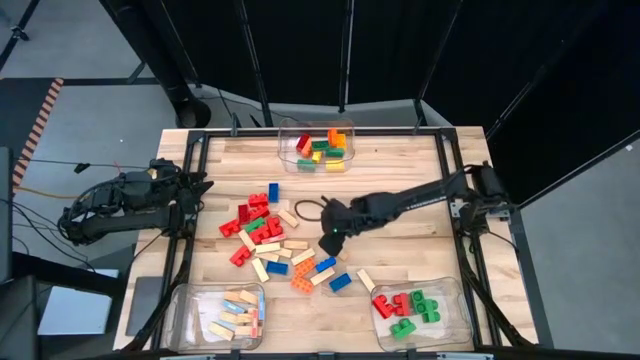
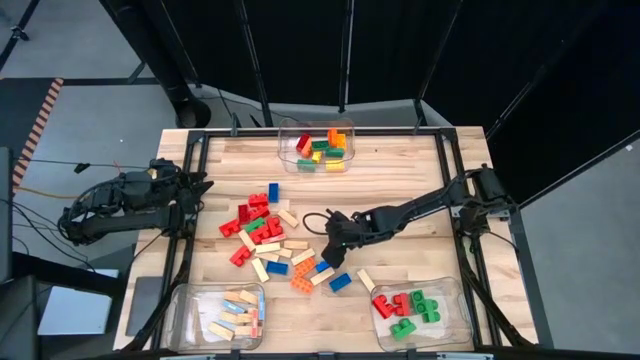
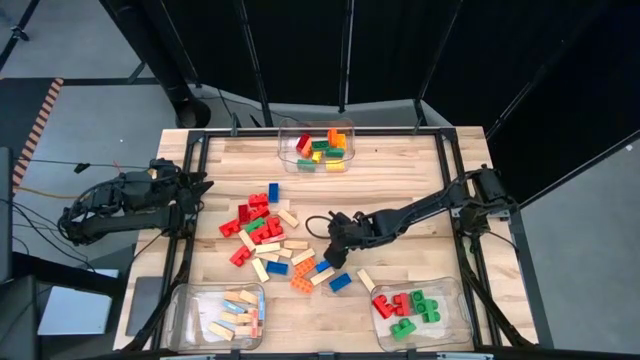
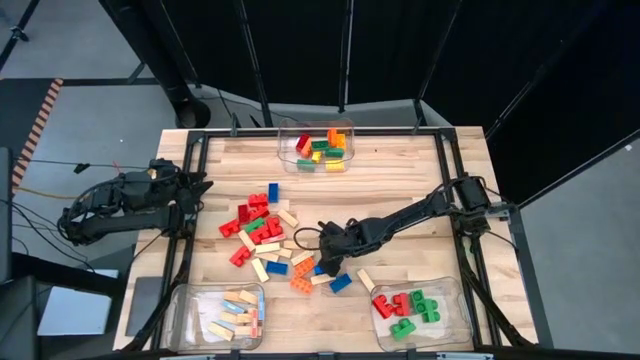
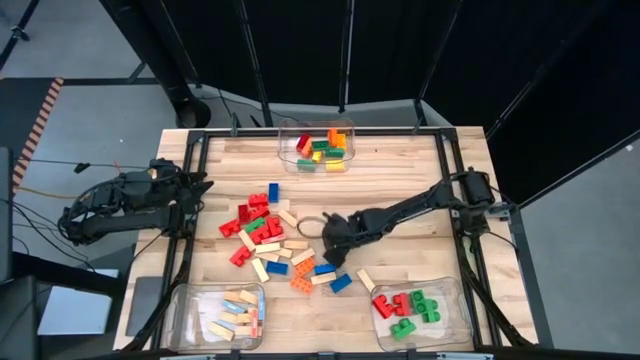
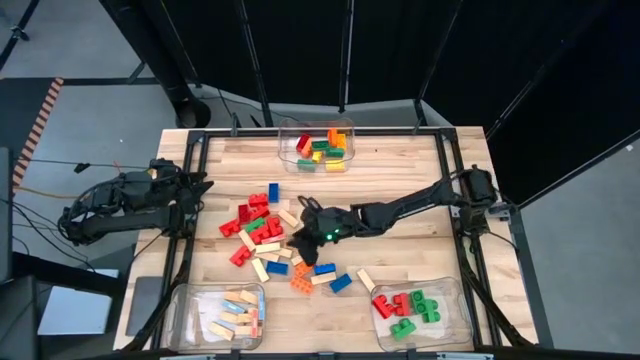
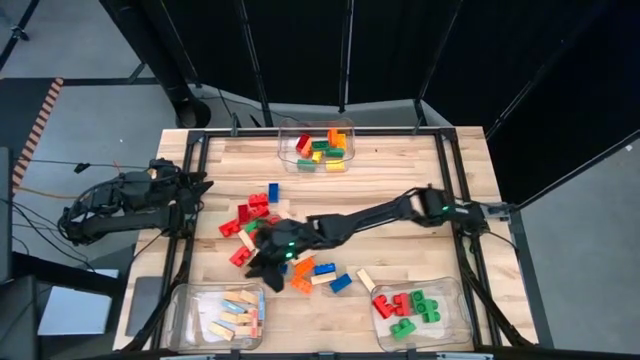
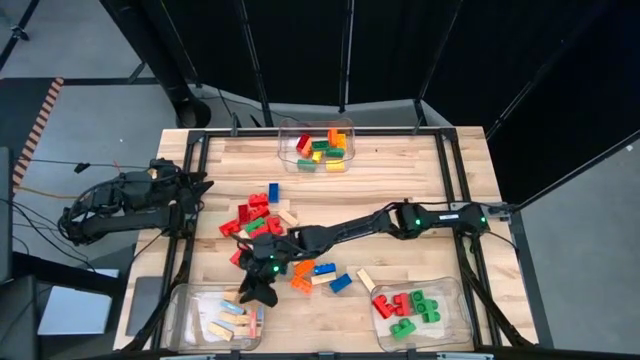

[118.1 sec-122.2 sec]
Task: Sort blocks by size
Put the white block into the bottom left transparent bin

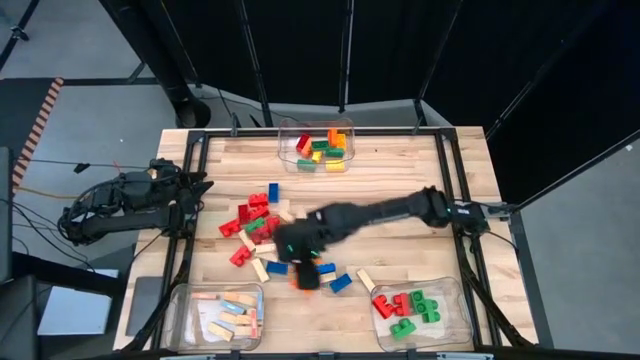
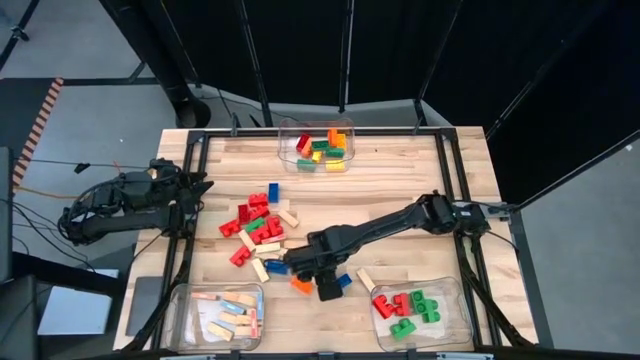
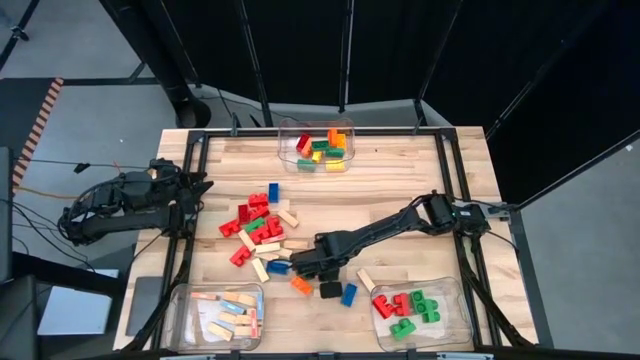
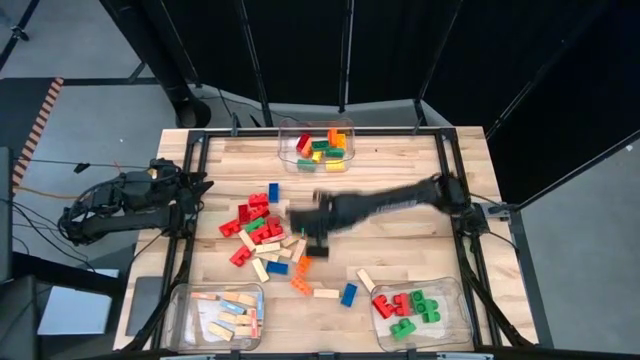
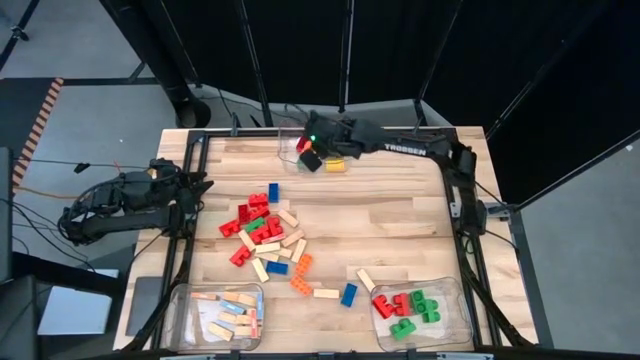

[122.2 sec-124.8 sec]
Put the 4-stud blue game piece into the top center transparent bin

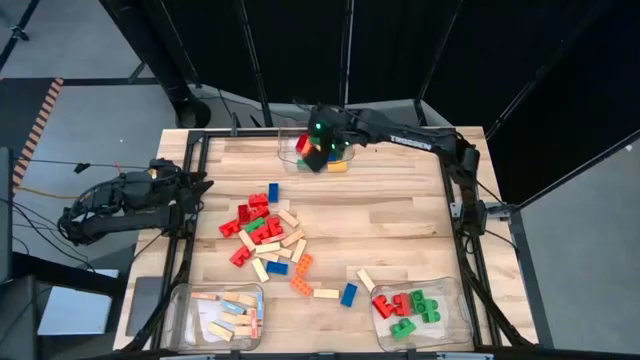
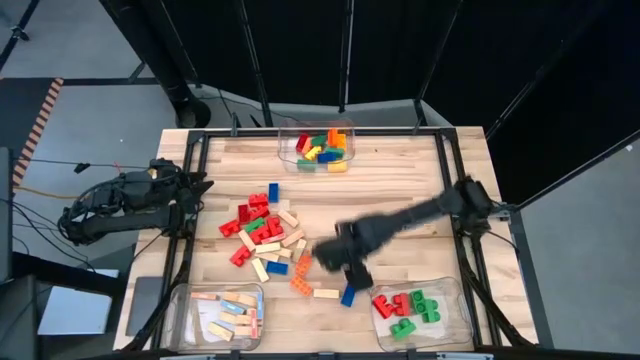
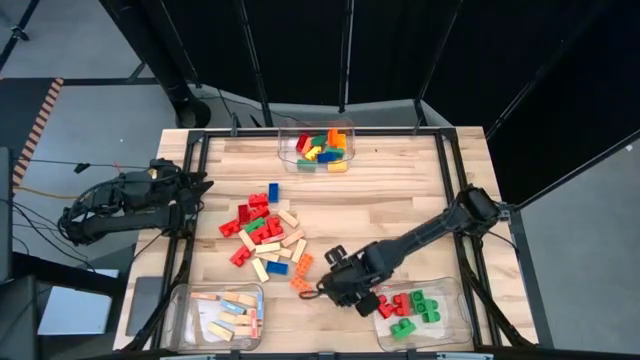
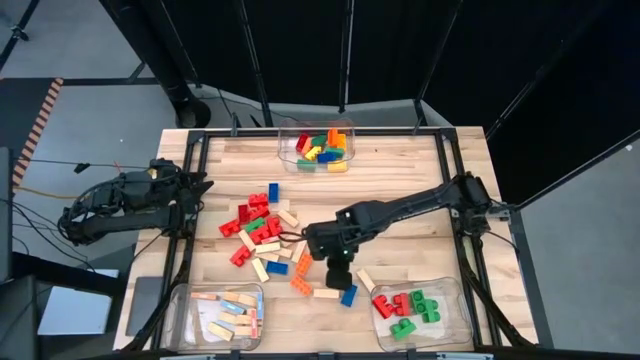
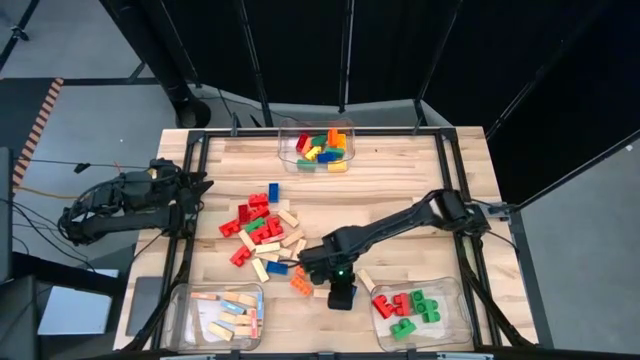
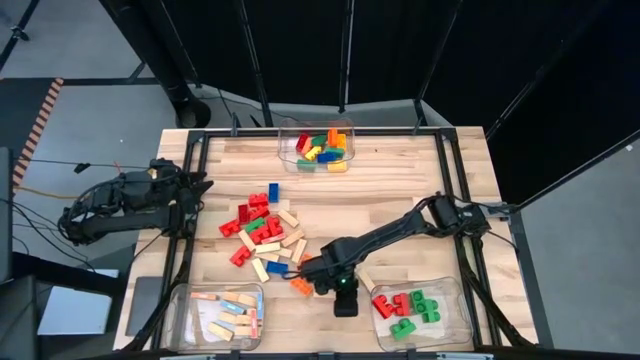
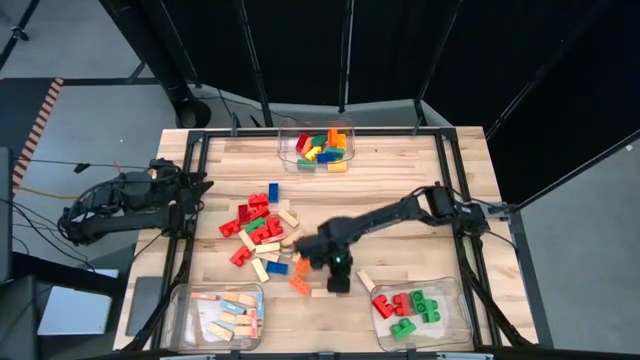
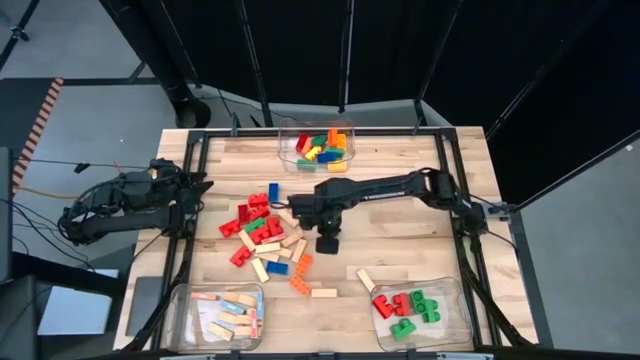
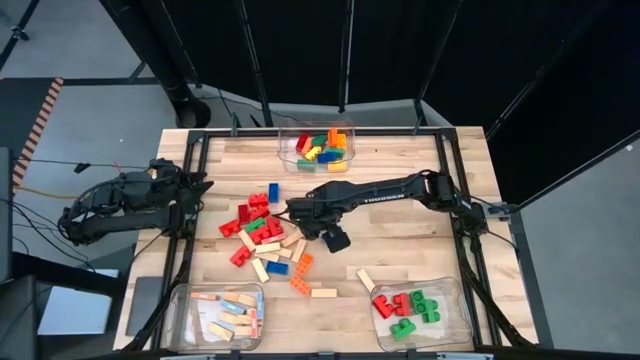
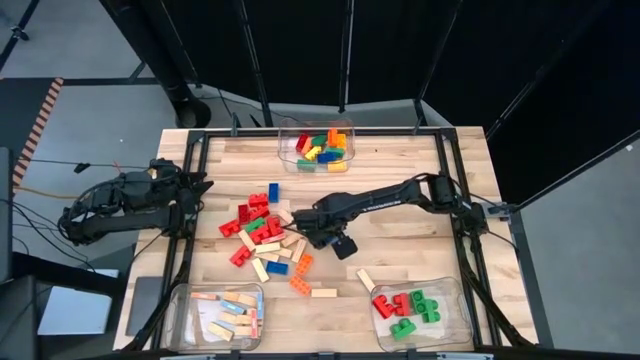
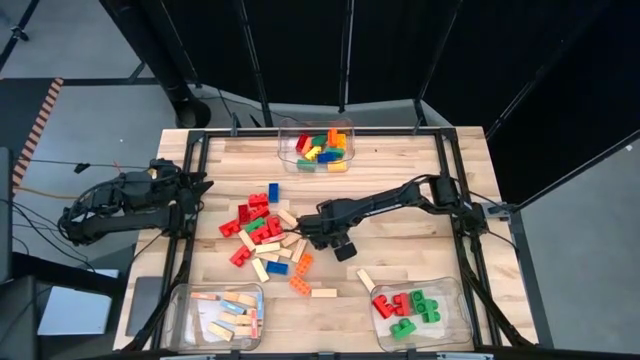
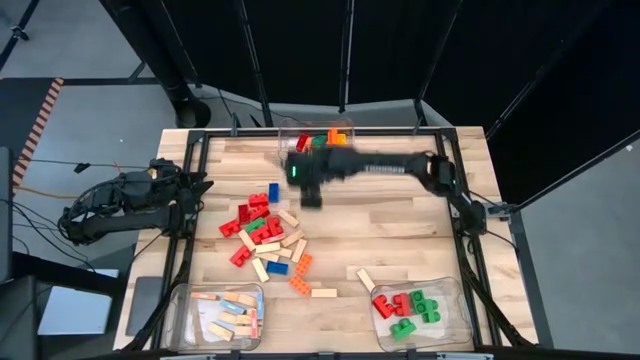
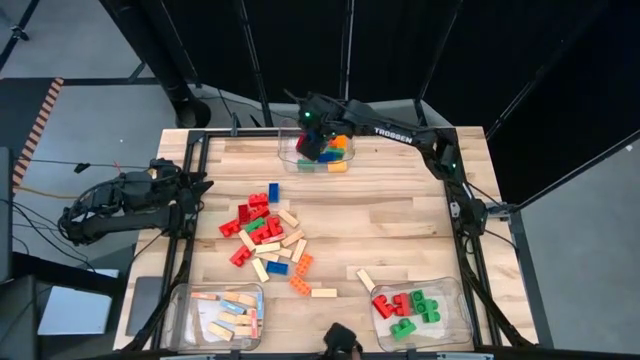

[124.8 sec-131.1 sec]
Put the 3-stud blue game piece into the top center transparent bin

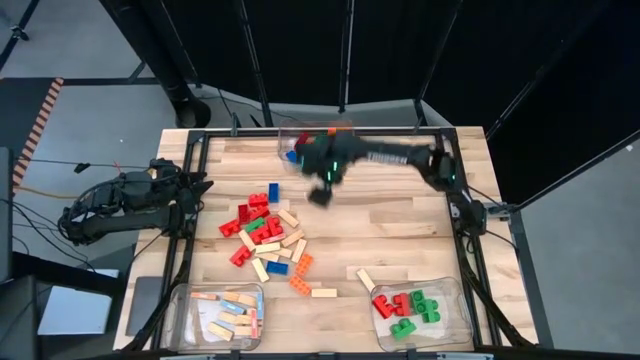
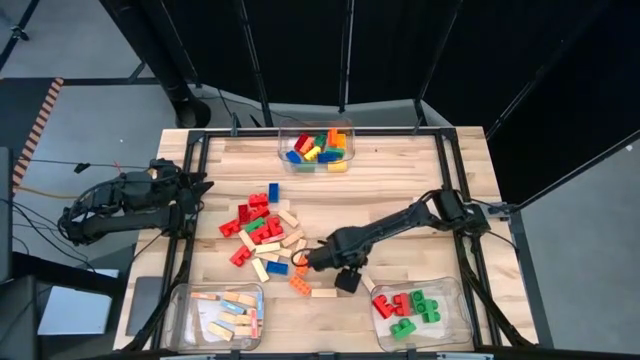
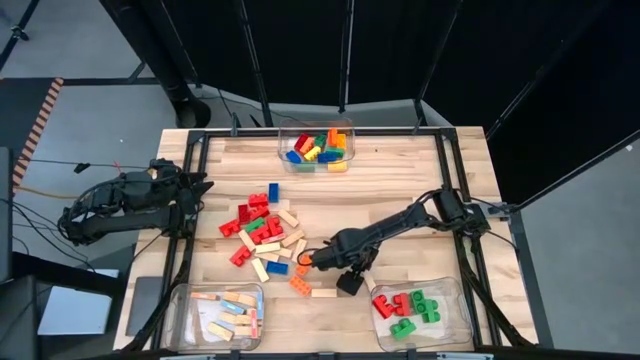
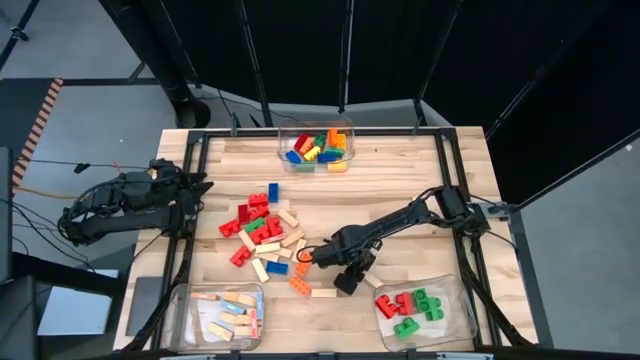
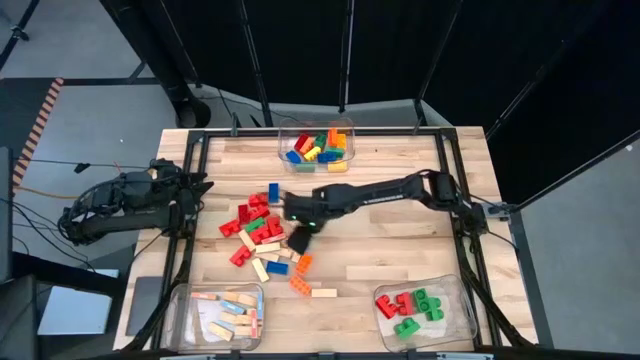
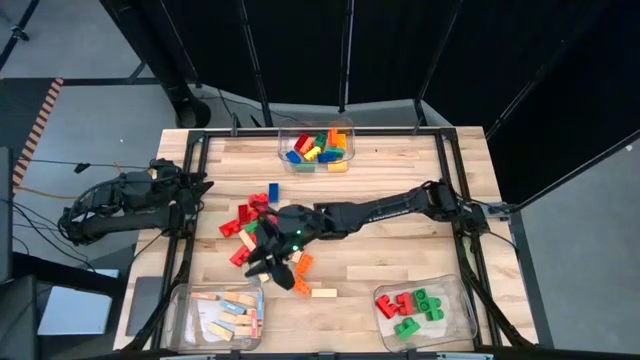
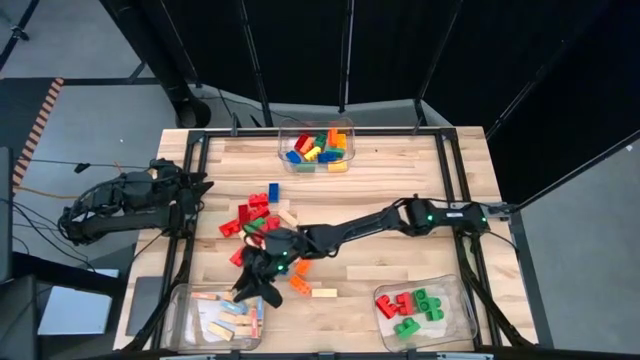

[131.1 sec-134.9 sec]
Put the white block into the bottom left transparent bin

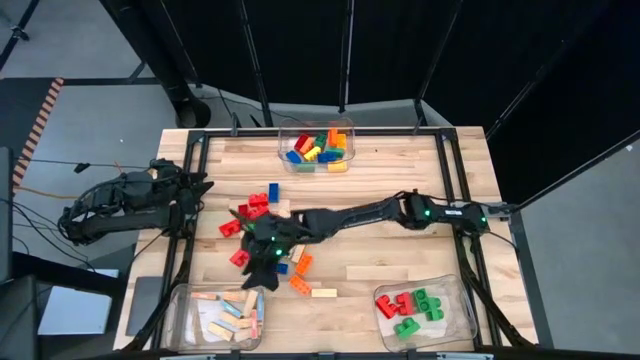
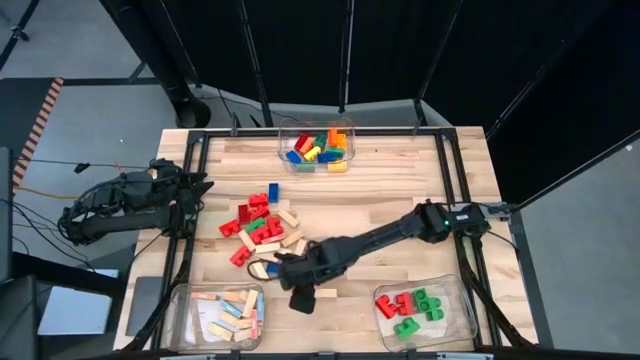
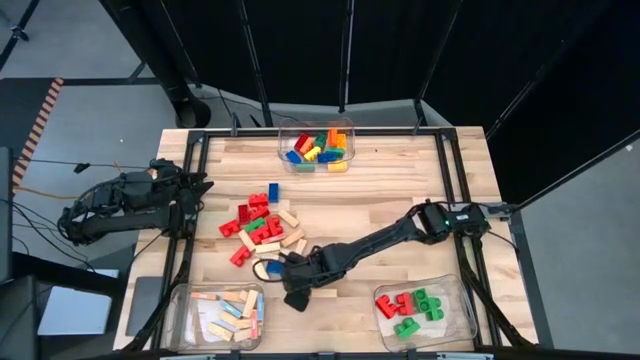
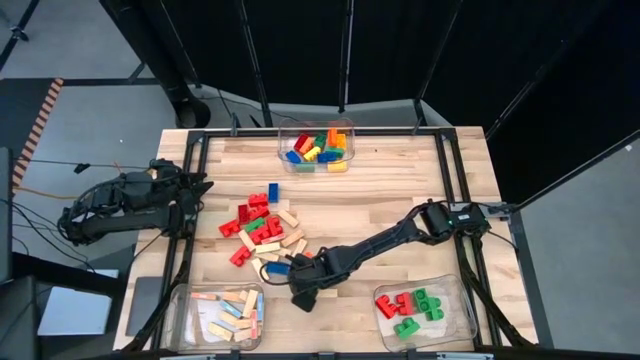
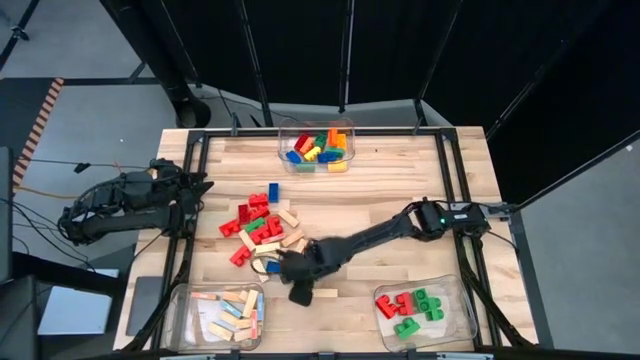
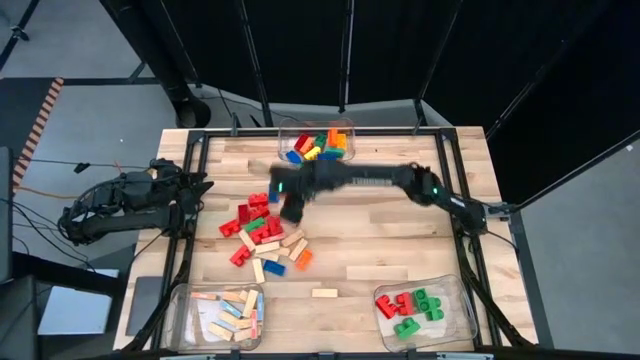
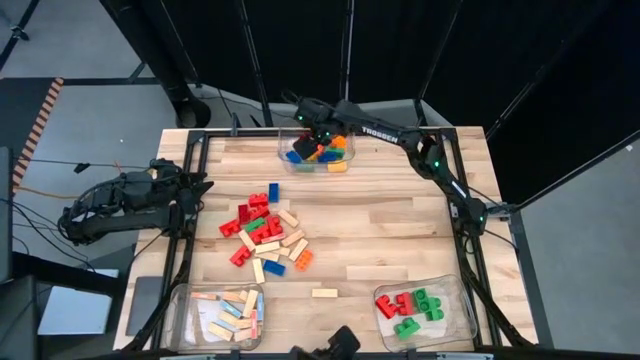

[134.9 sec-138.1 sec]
Put the 8-stud orange game piece into the top center transparent bin

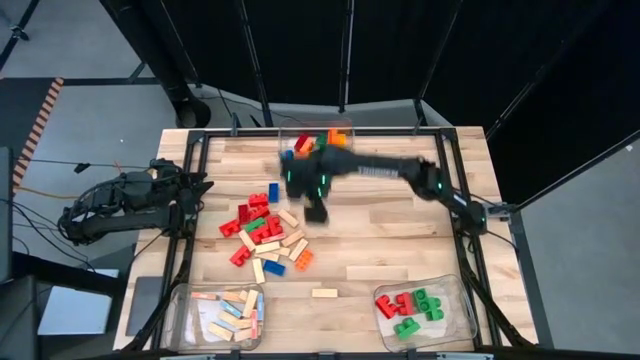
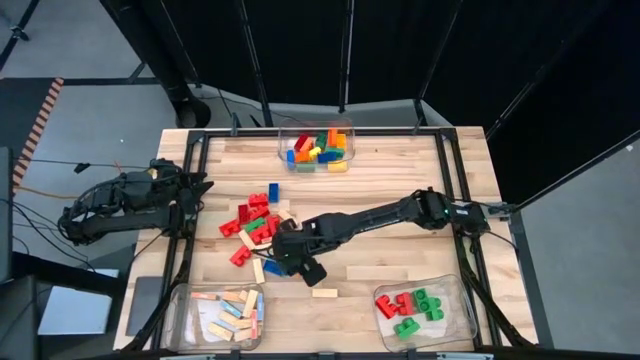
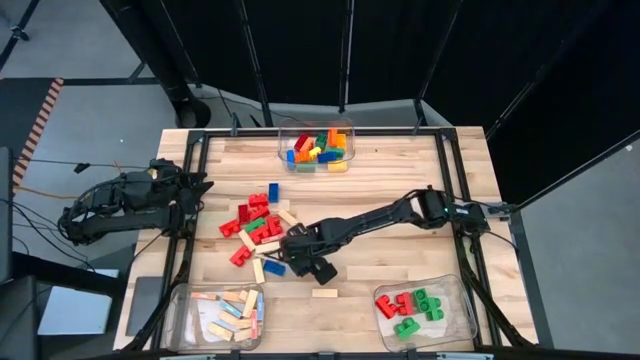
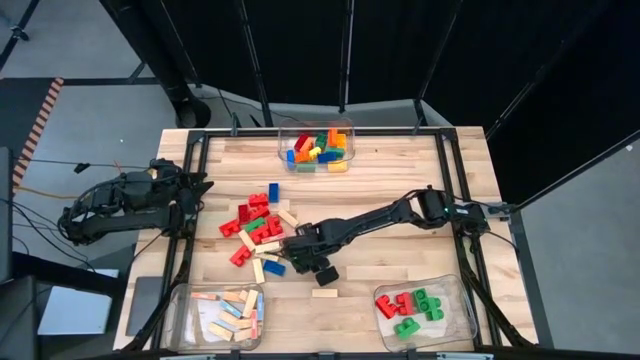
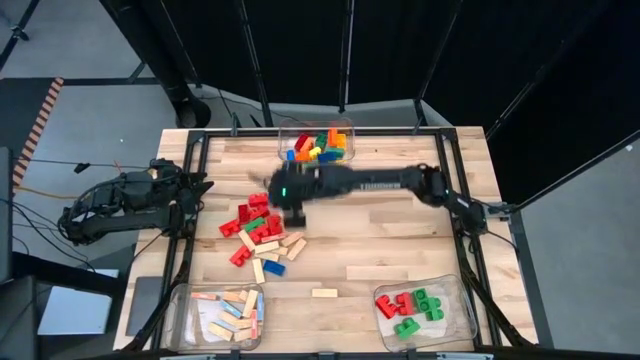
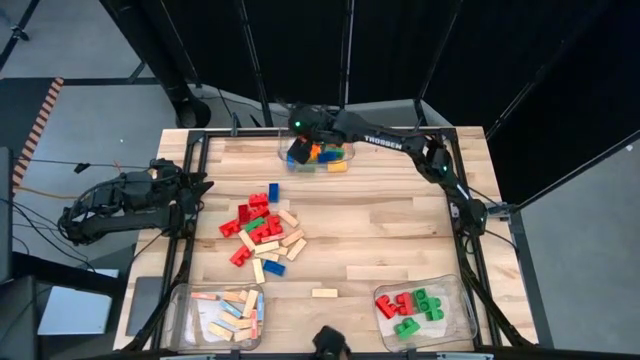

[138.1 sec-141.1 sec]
Put the 8-stud orange game piece into the top center transparent bin
